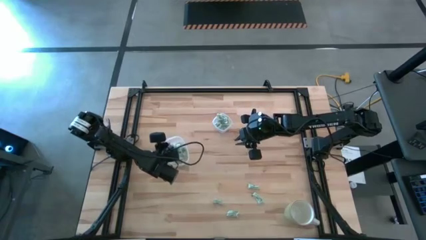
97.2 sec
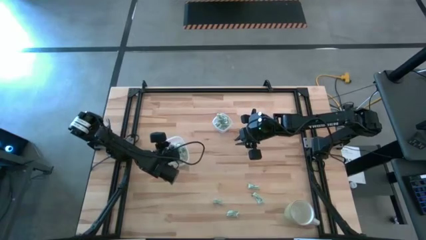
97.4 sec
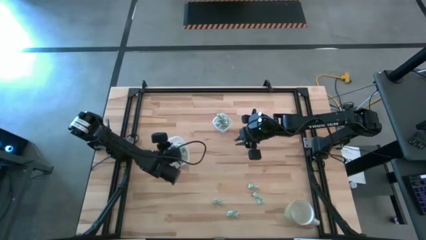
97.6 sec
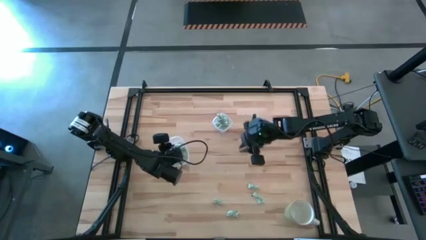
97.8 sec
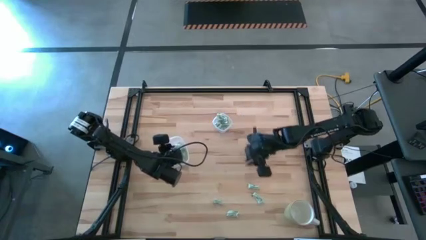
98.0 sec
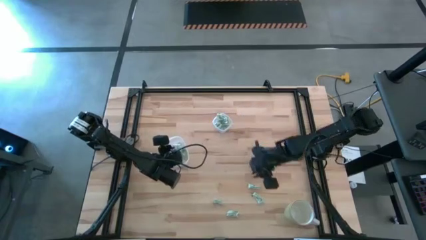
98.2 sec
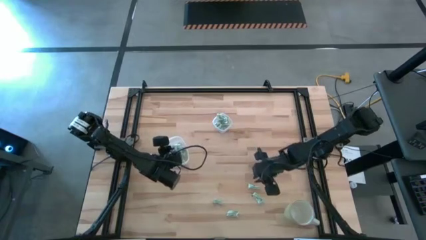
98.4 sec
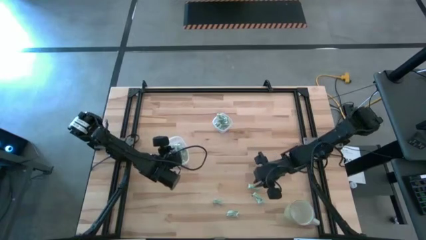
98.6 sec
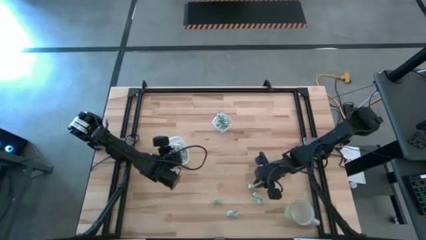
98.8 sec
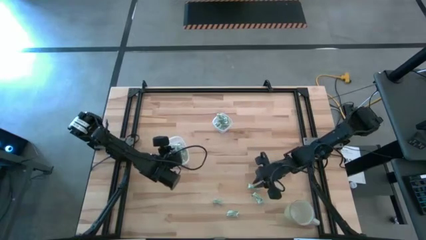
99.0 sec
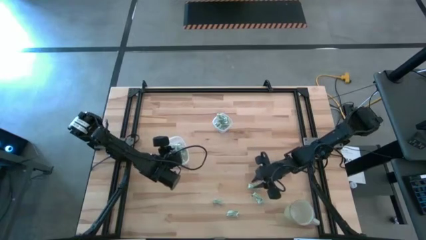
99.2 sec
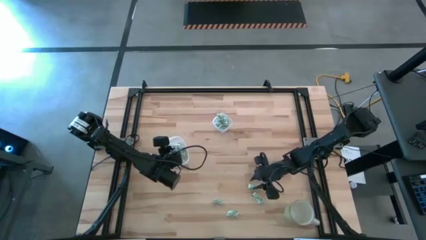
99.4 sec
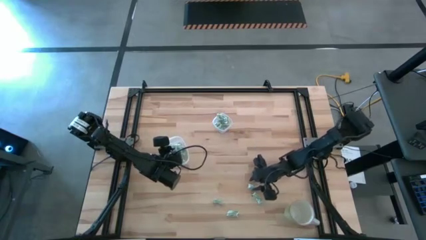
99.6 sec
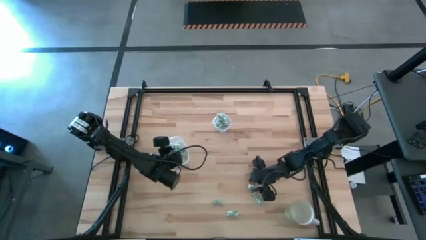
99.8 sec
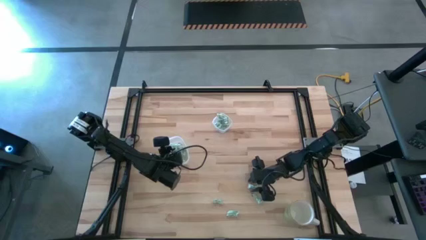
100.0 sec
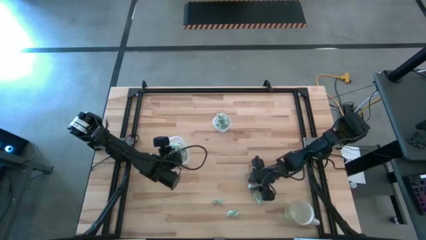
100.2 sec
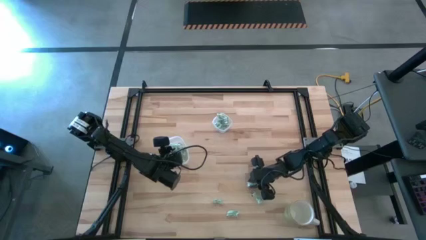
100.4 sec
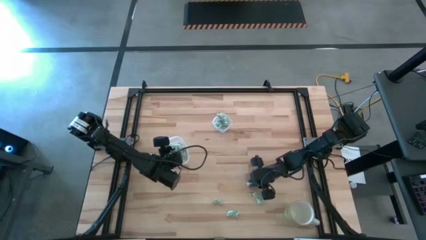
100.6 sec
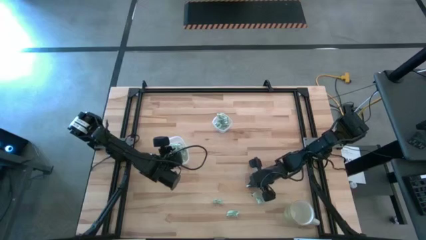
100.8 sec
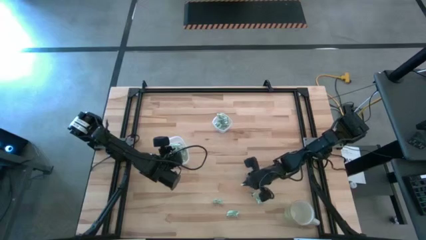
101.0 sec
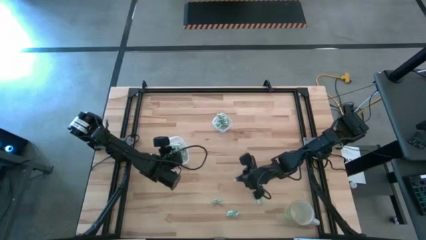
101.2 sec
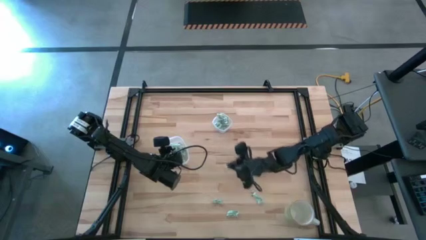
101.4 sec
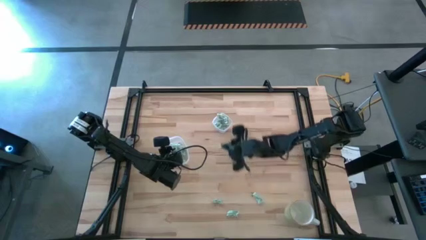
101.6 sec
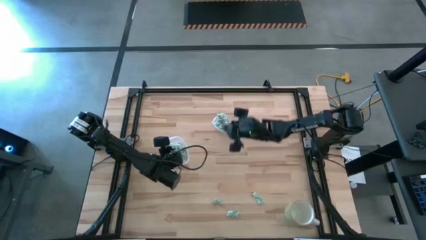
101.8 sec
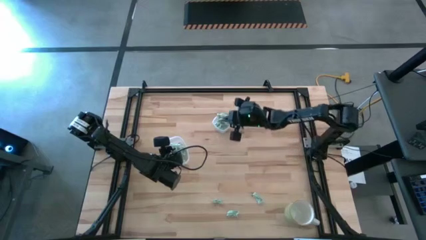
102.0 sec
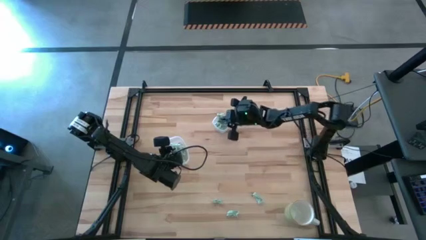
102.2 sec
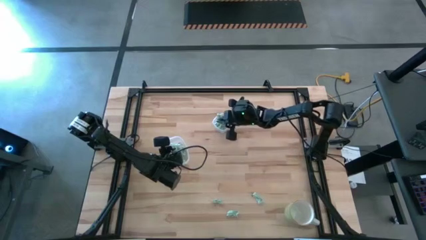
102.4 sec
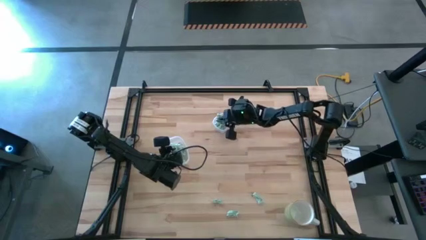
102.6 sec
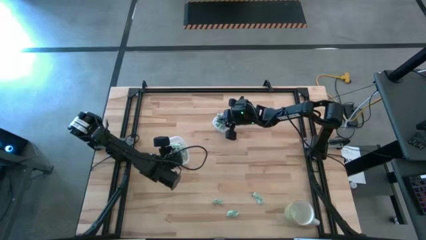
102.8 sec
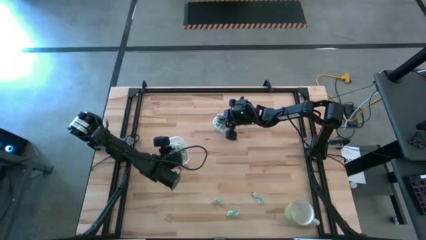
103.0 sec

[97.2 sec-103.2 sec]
Task: Pick and place items into bin
Put the stevia packet into the small transparent container

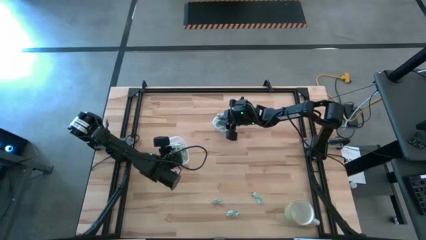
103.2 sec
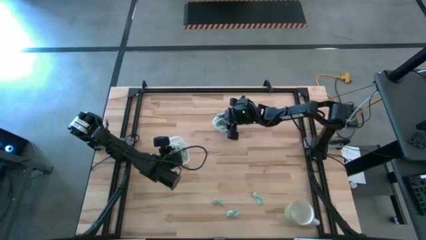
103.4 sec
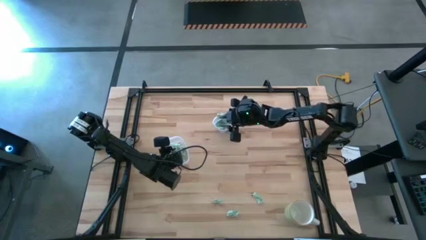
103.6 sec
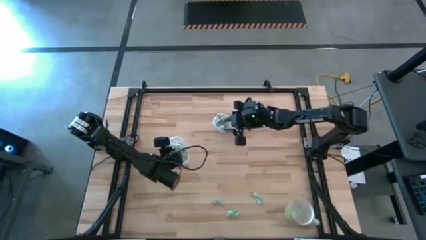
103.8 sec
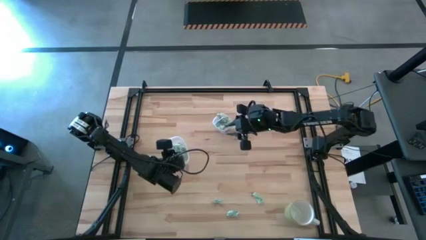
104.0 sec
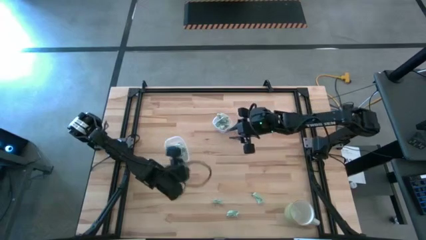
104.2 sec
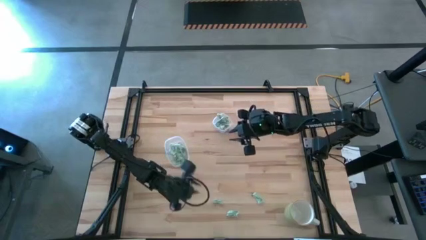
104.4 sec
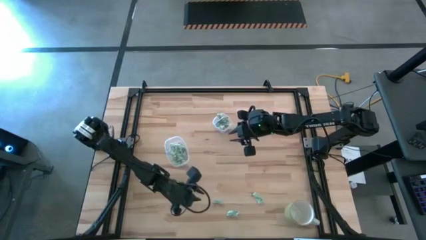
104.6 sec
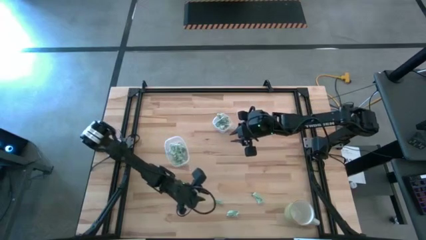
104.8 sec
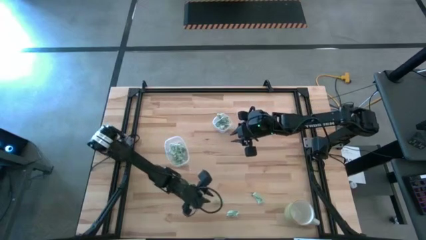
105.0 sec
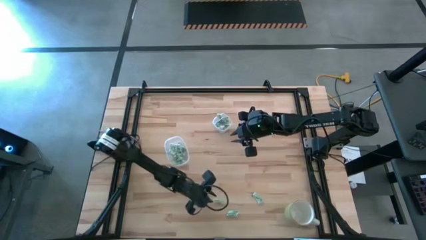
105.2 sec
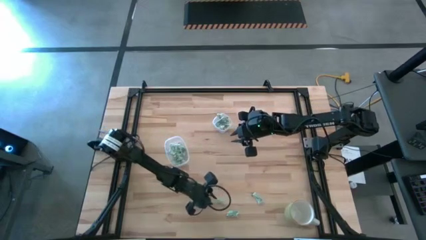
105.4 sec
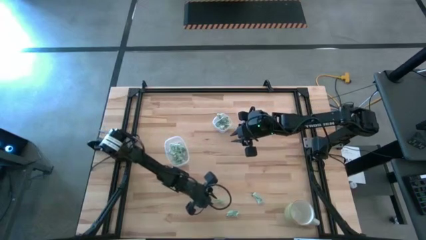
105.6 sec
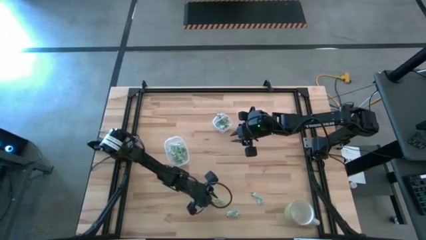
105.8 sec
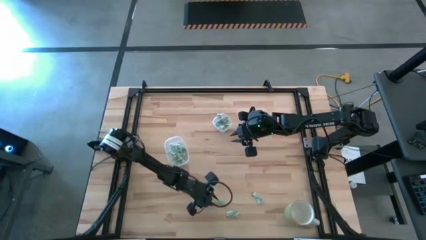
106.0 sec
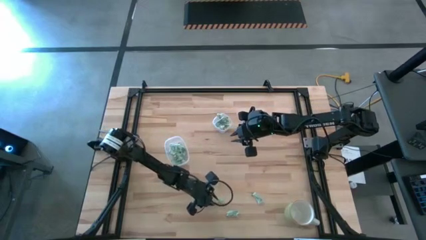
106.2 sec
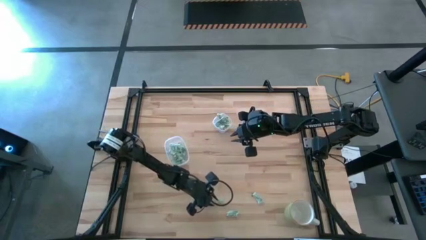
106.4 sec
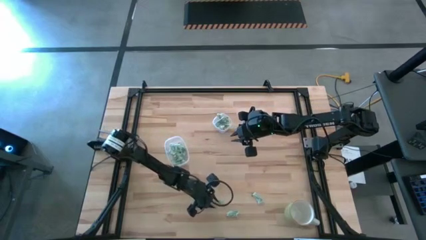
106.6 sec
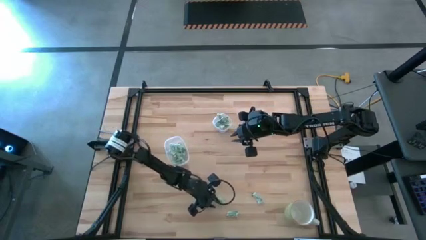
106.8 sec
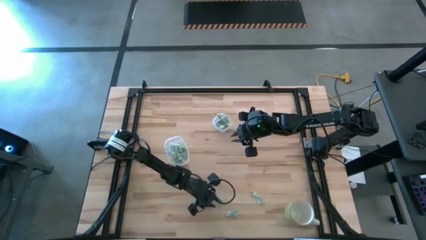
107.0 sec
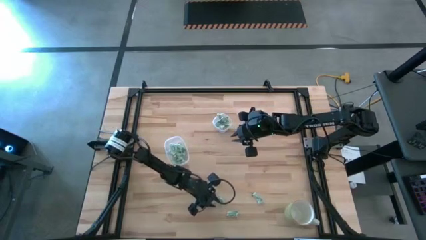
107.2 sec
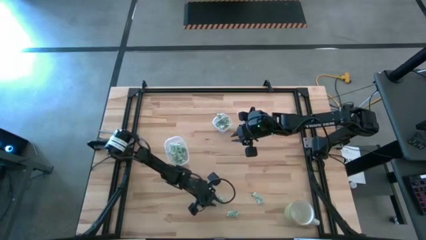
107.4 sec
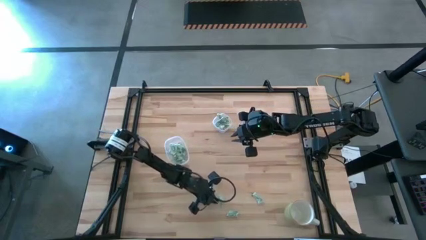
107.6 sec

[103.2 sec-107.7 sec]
Put the stevia packet into the large transparent container

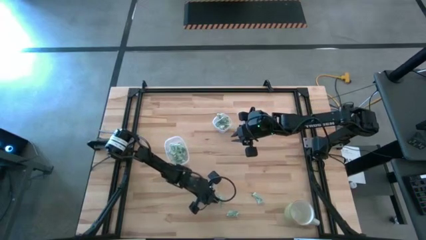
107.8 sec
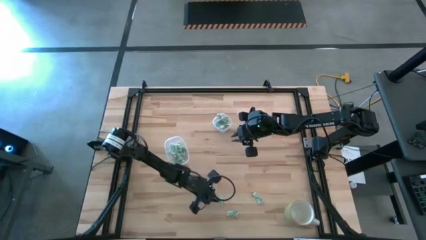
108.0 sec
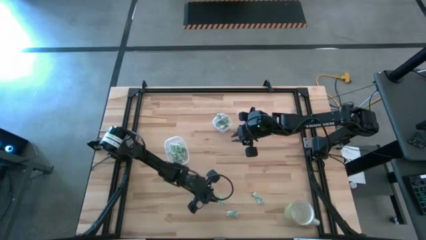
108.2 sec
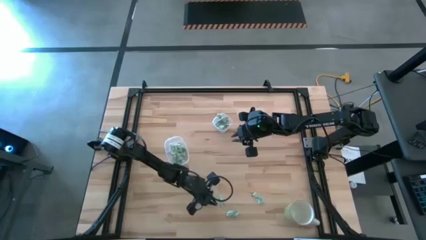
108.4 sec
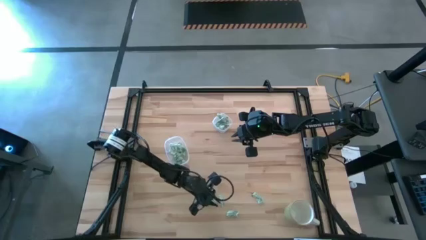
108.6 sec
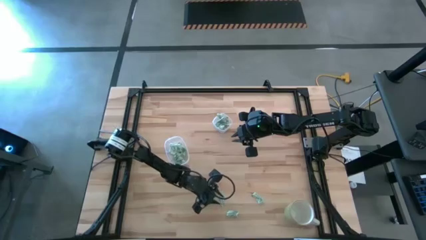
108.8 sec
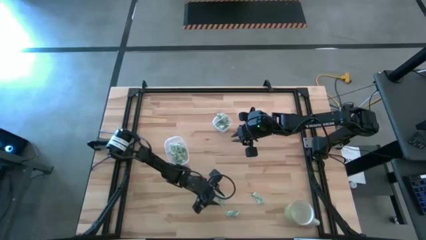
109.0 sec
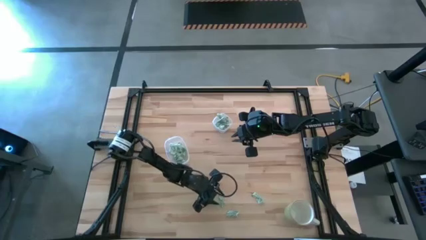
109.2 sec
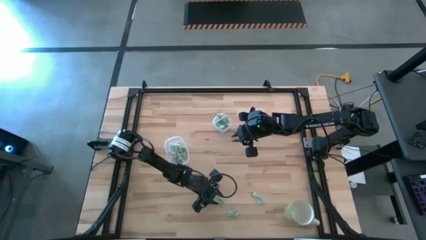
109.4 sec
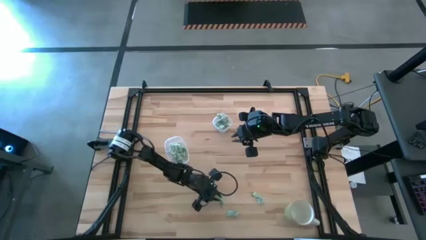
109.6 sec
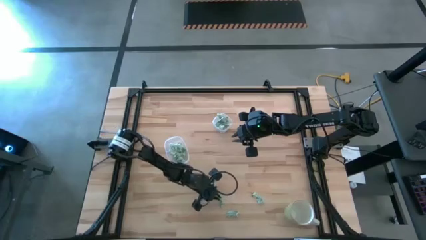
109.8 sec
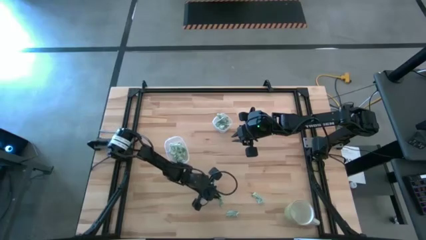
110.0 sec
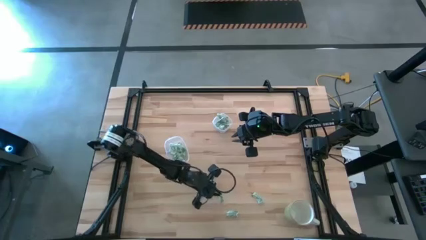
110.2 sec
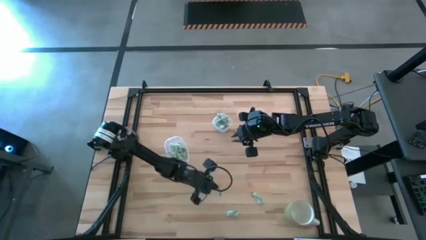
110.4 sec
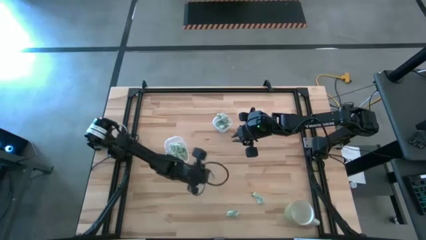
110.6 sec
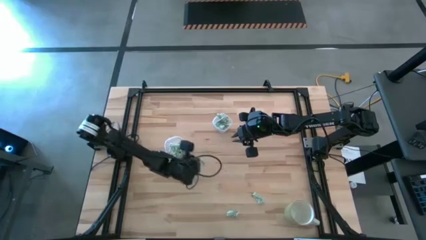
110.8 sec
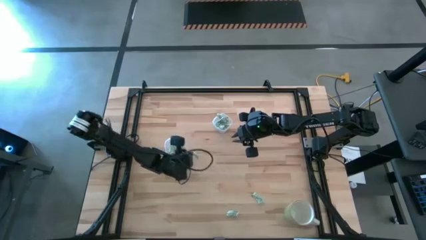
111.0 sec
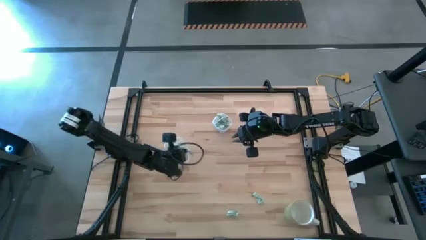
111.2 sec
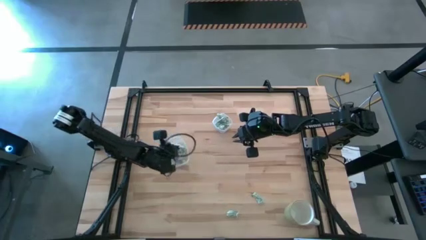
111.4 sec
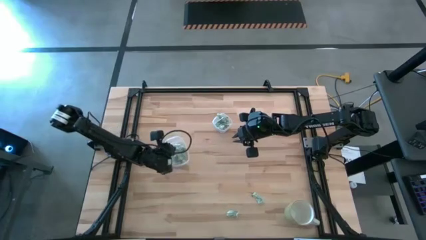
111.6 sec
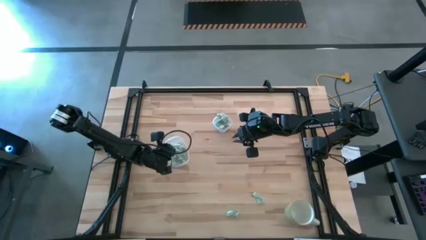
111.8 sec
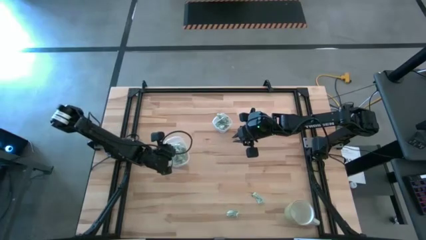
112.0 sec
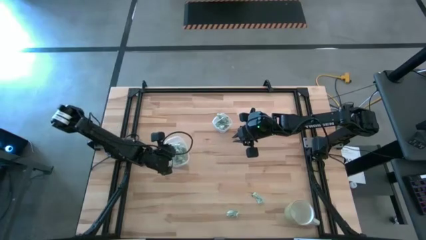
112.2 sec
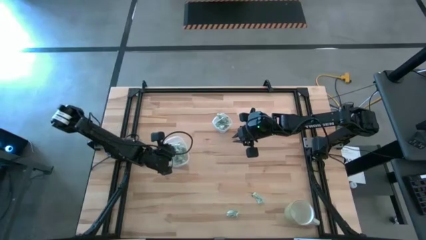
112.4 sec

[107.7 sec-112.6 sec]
Put the stevia packet into the large transparent container
